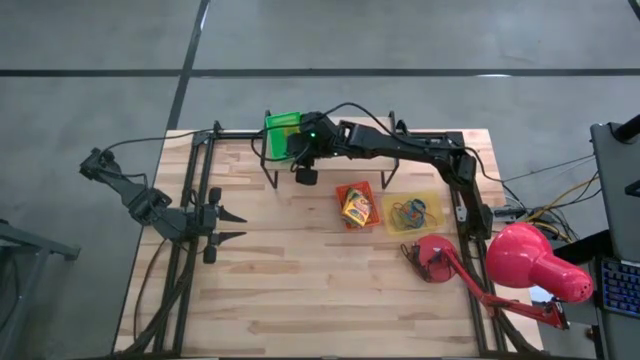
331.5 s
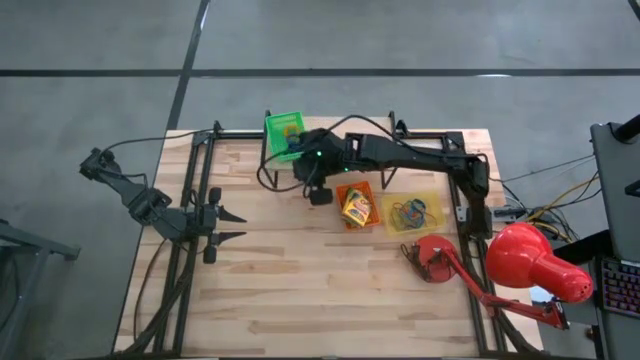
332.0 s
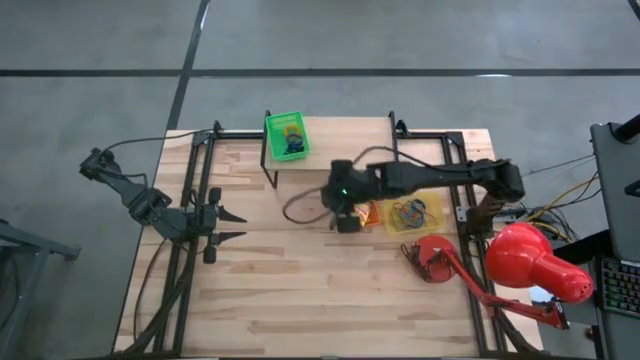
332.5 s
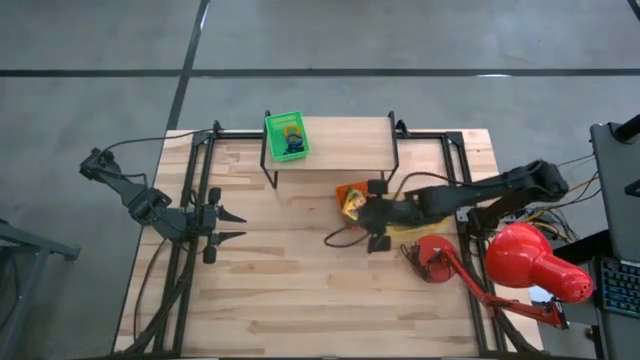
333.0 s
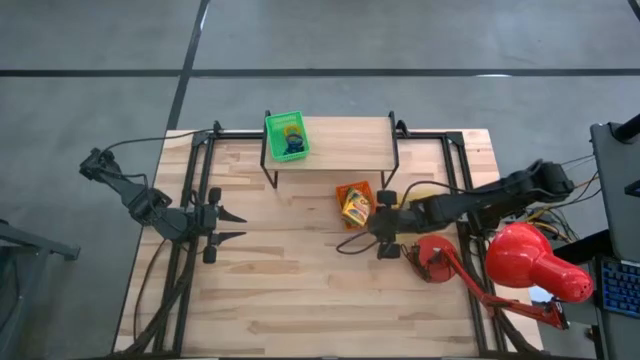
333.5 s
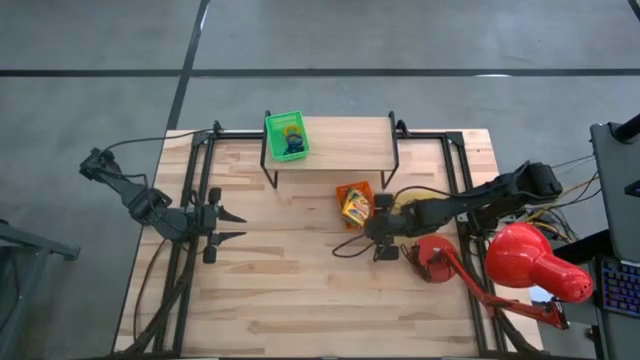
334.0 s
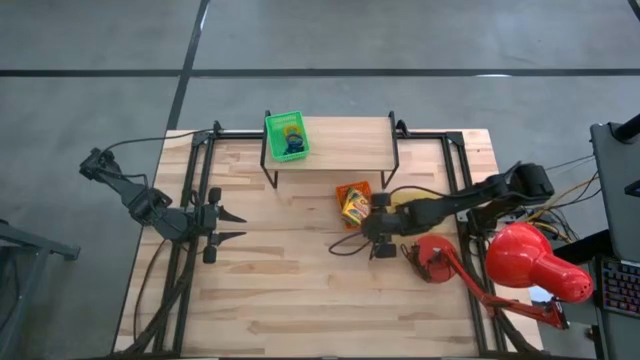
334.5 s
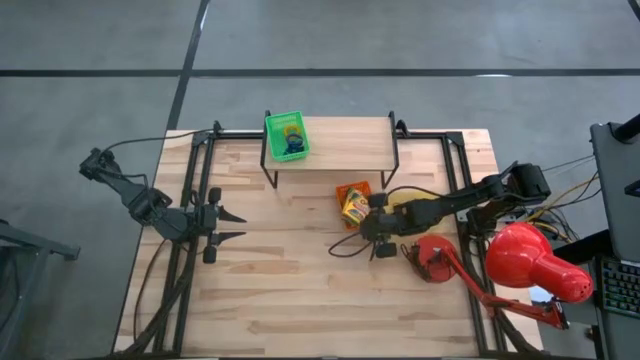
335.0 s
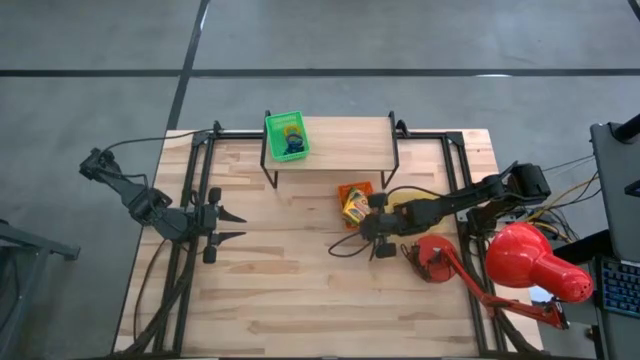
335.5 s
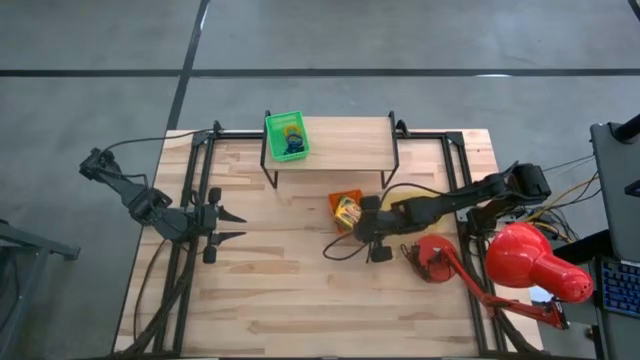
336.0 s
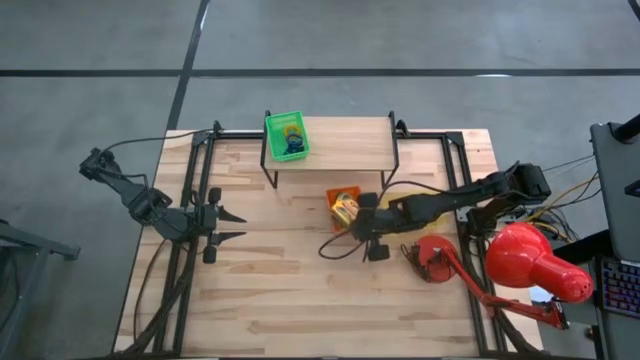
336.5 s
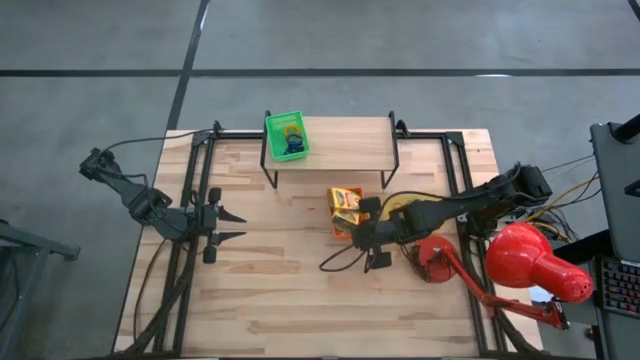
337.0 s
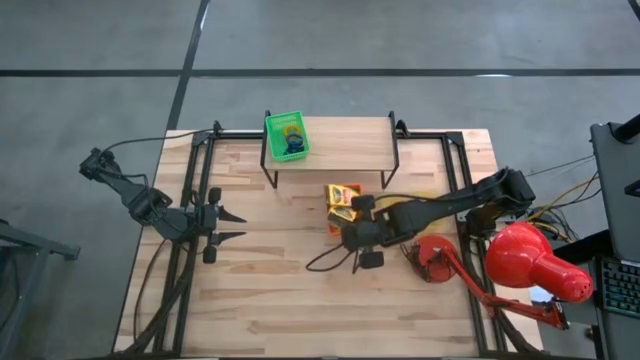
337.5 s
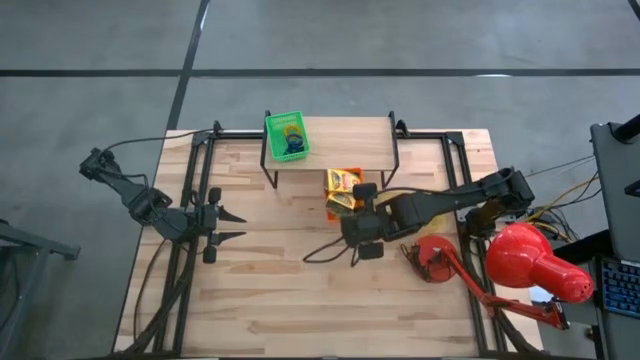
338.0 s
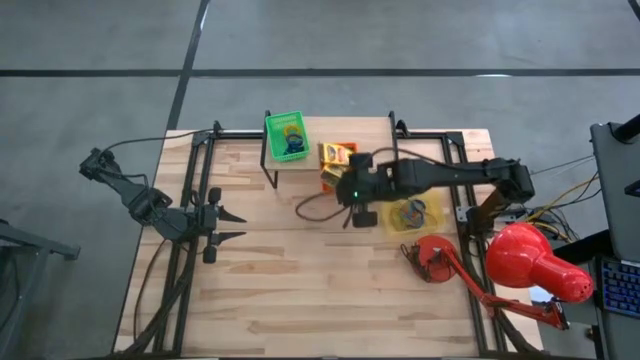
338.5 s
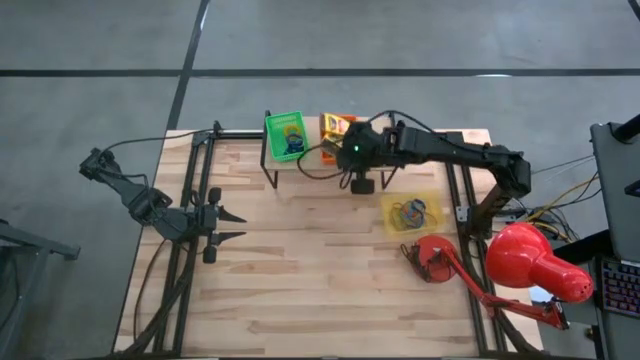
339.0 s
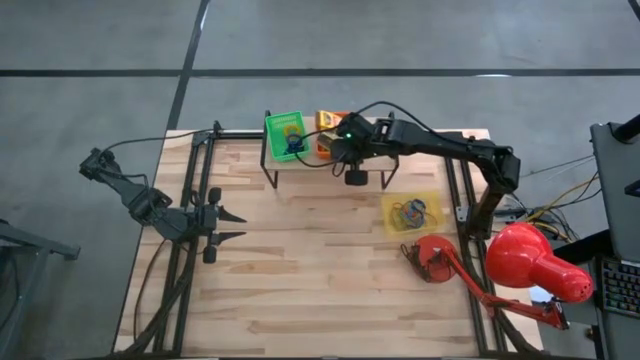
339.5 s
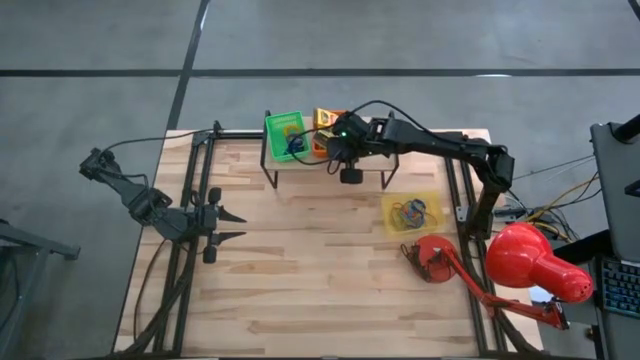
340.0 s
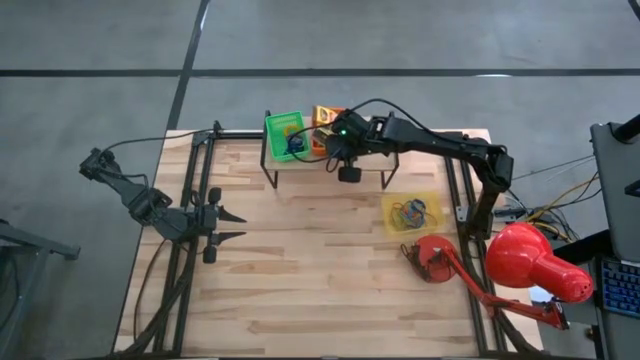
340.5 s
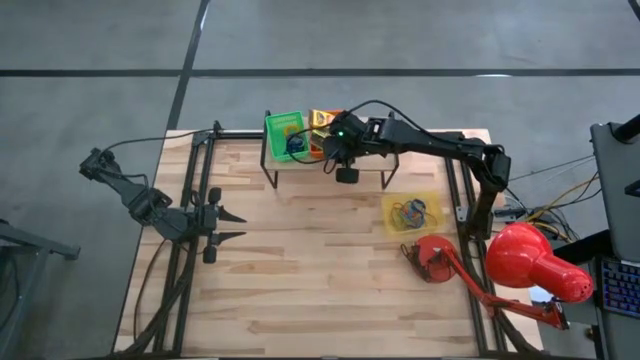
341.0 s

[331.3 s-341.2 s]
Task: Pick & Place Office Desk Supplies
Put the orange bin on the shelf

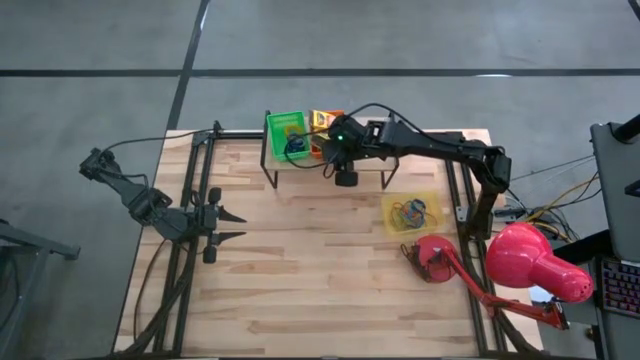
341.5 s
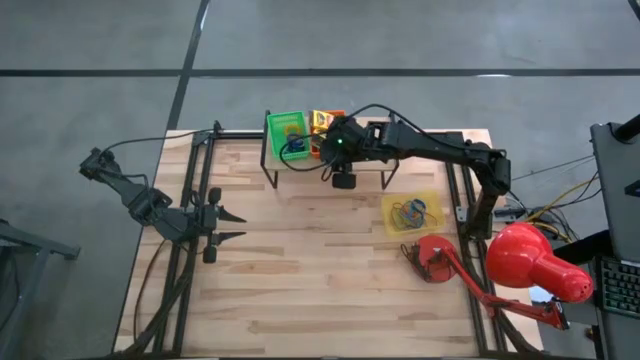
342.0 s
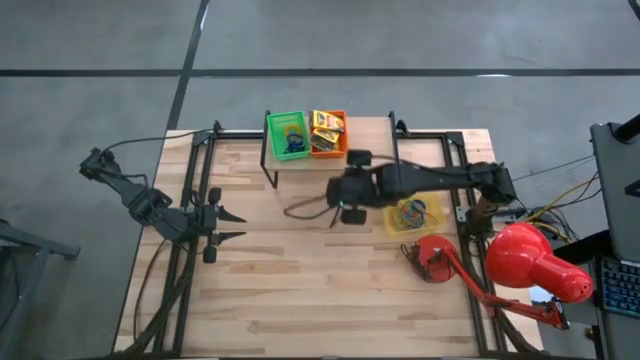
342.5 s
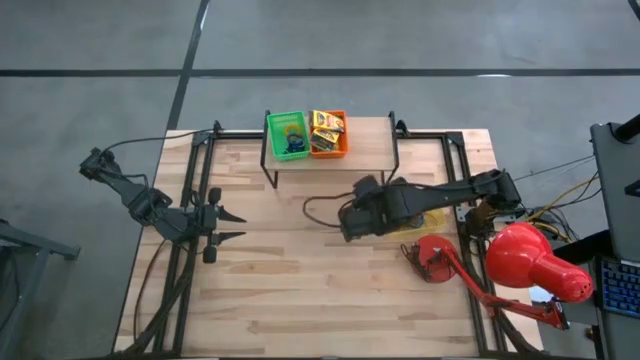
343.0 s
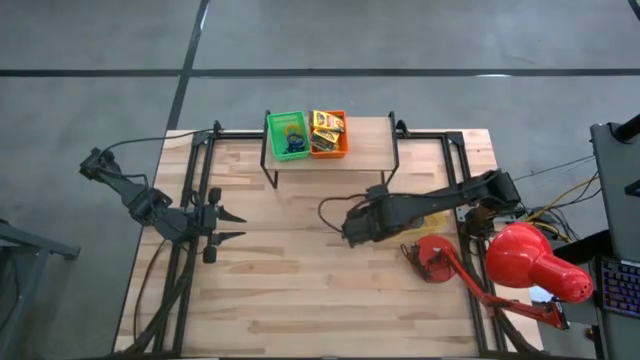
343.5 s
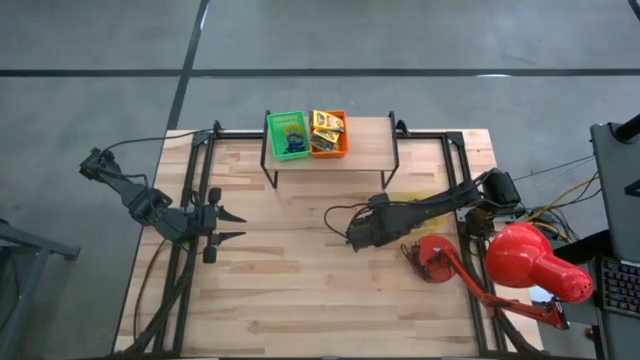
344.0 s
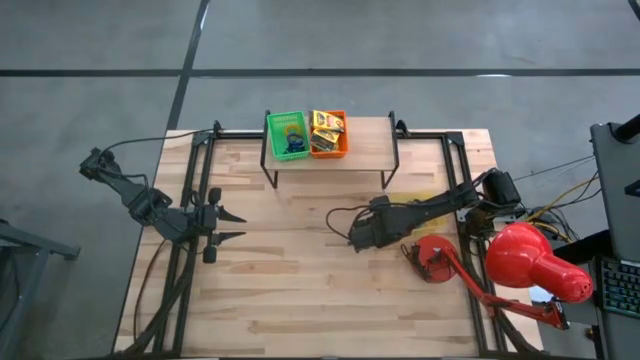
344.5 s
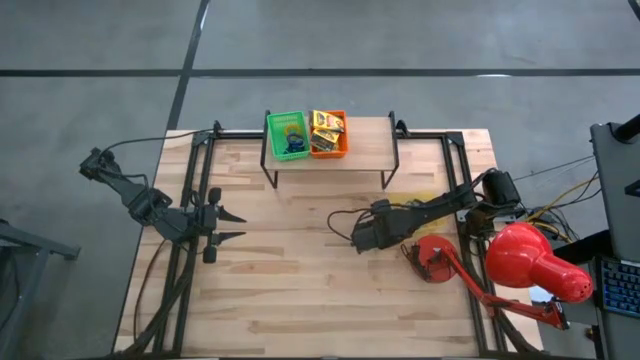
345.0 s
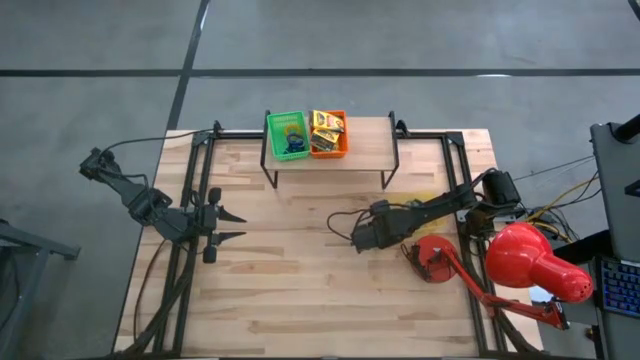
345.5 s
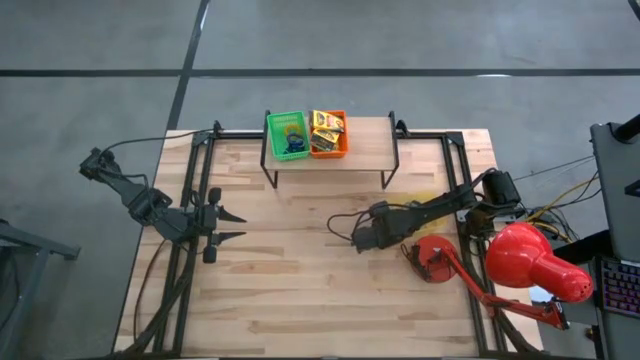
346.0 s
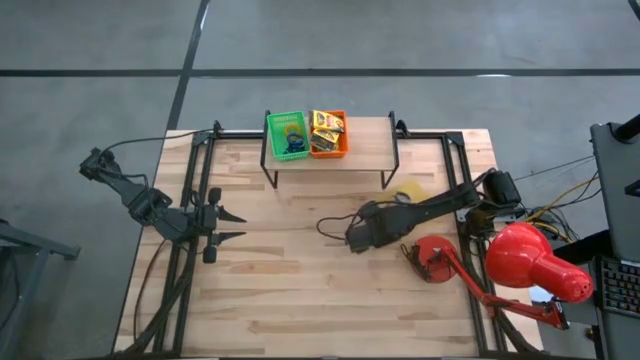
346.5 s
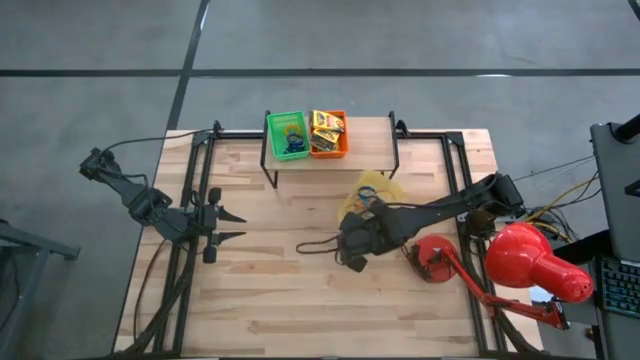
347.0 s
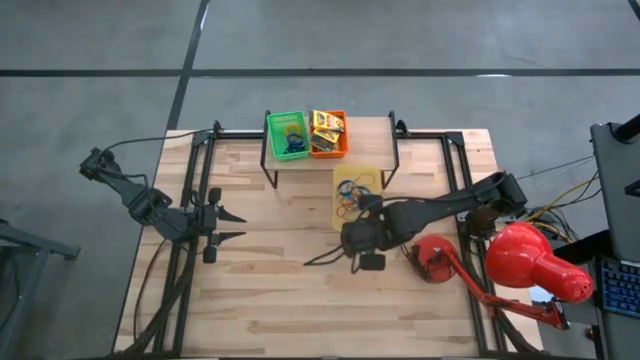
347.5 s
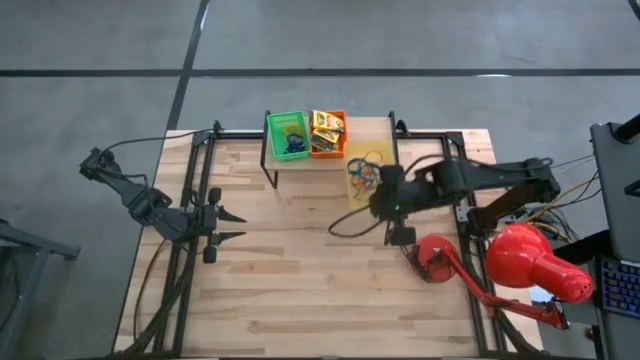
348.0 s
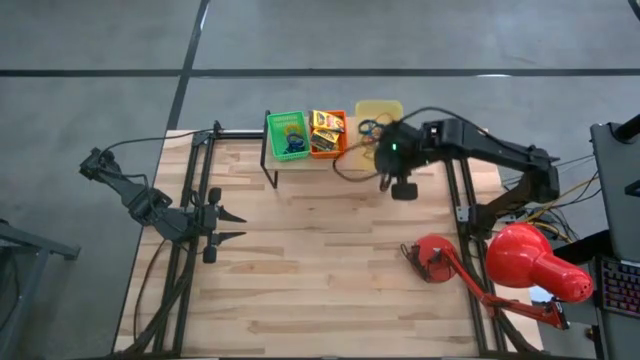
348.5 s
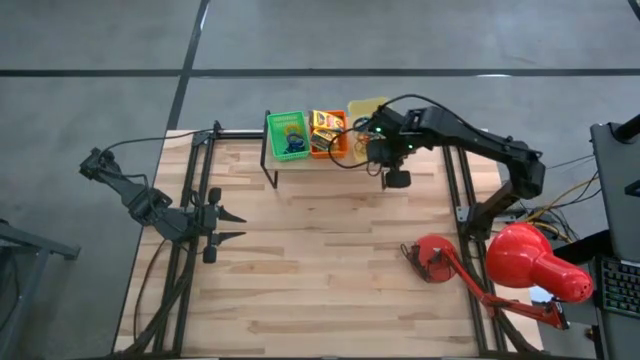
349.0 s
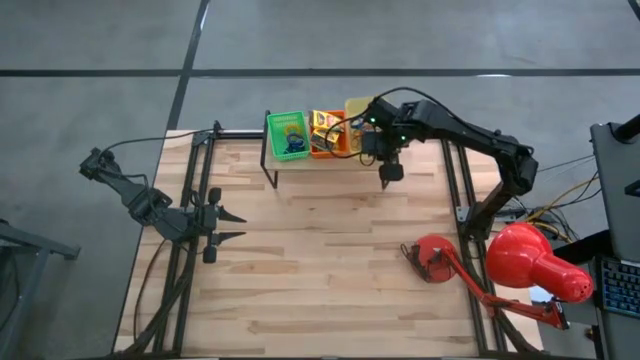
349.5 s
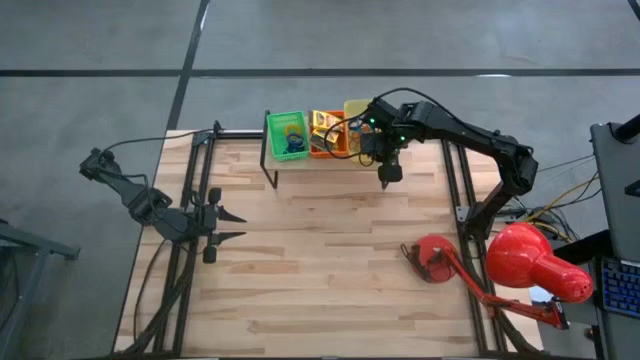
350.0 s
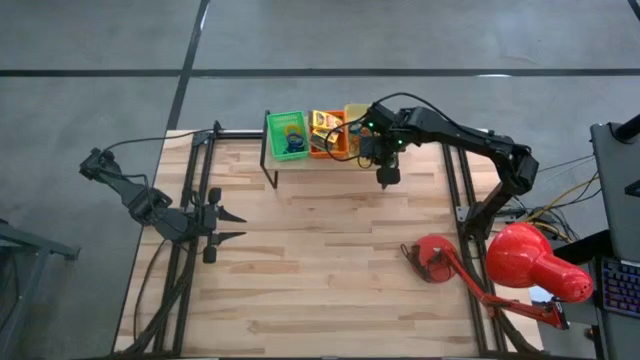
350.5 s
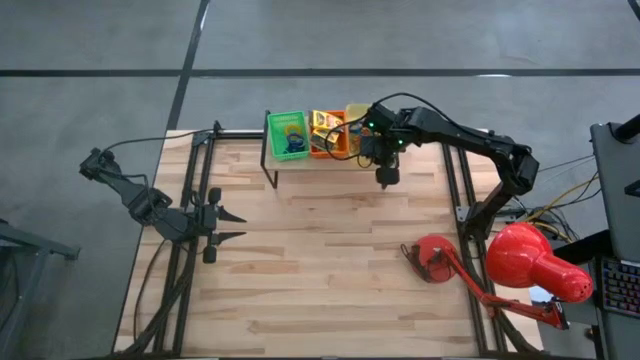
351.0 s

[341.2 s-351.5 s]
Put the yellow bin on the shelf

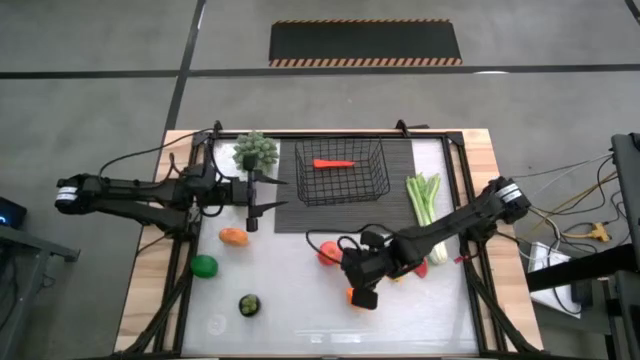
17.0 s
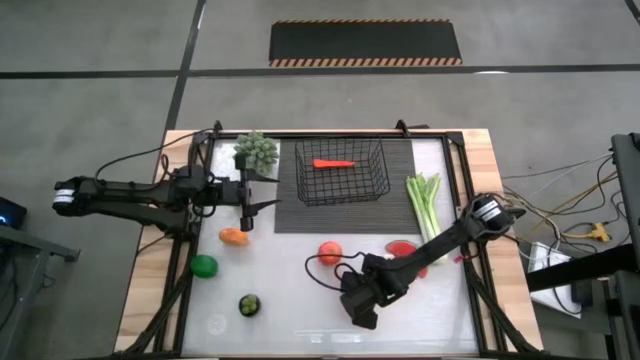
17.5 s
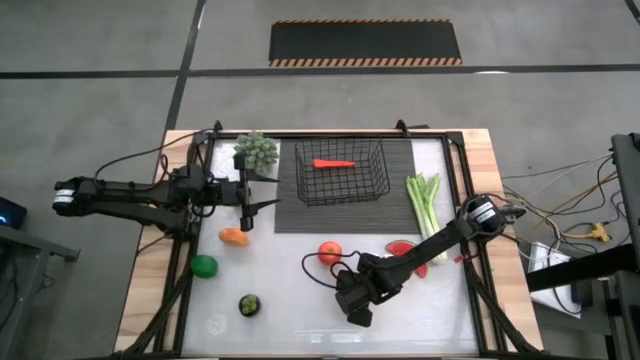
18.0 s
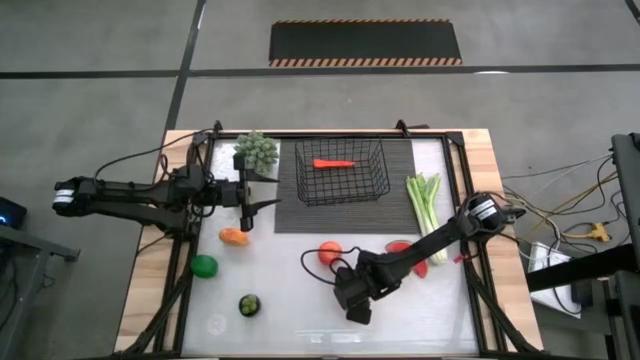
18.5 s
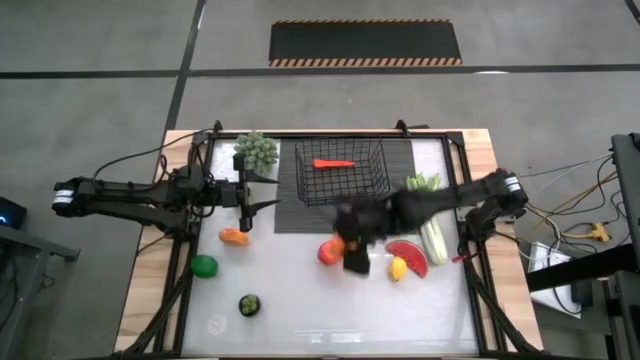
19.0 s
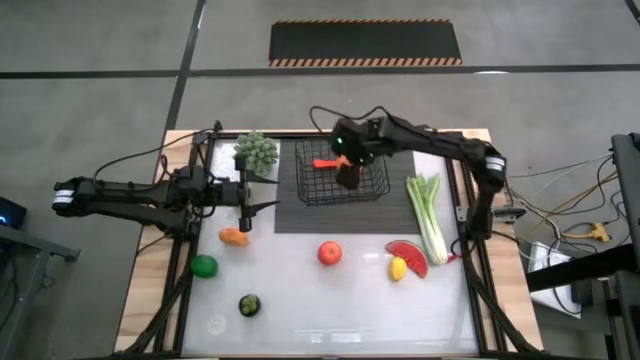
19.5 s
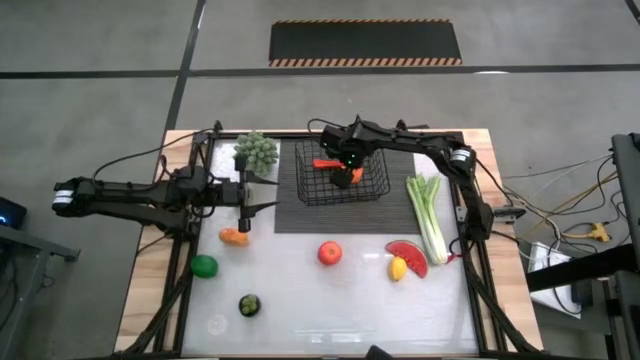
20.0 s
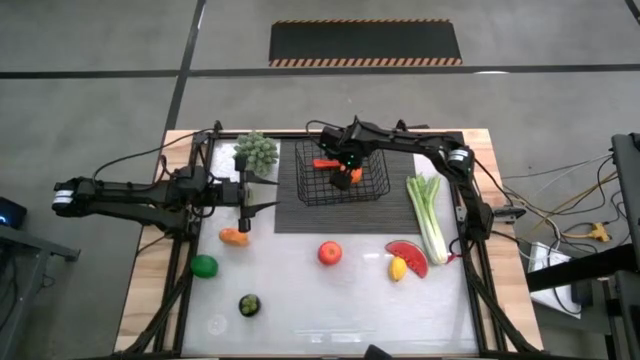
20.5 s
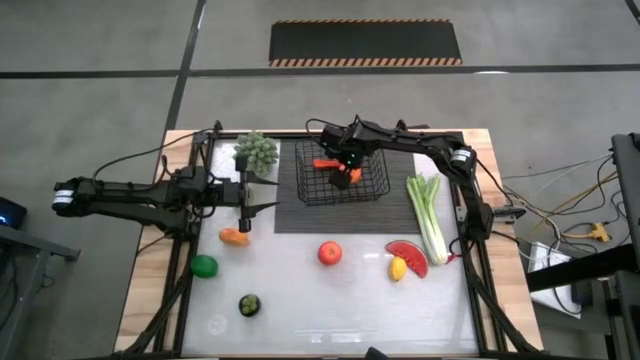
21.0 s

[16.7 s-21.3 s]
Task: Build produce basket
Put the orange into the black wire basket
